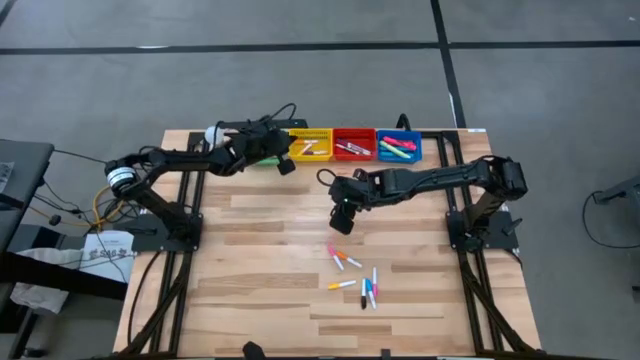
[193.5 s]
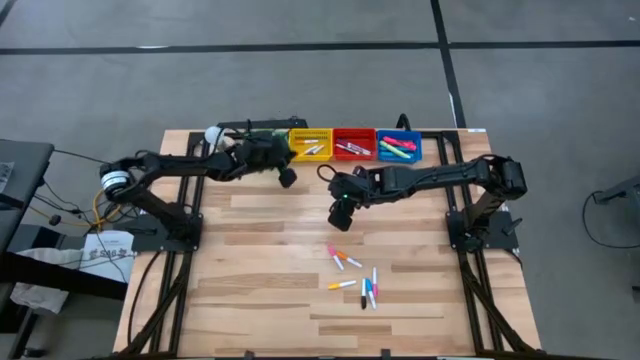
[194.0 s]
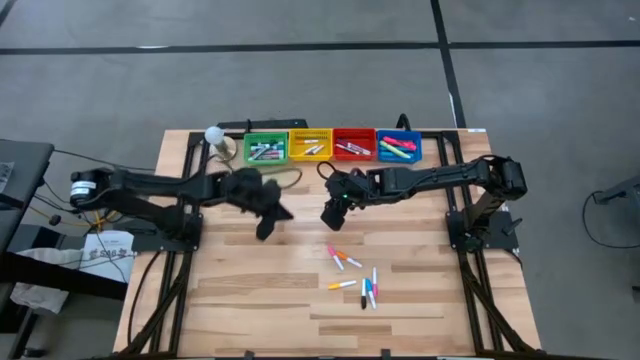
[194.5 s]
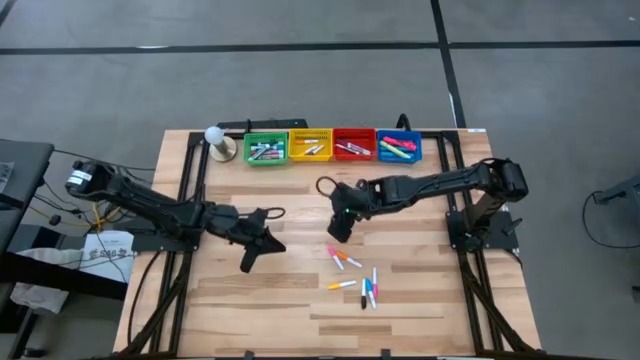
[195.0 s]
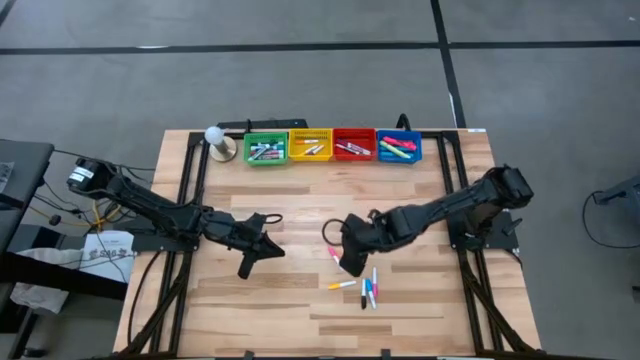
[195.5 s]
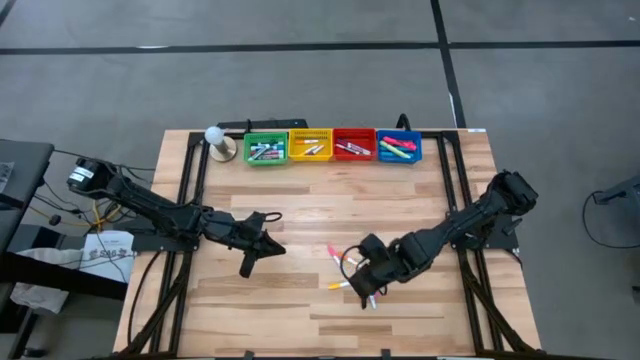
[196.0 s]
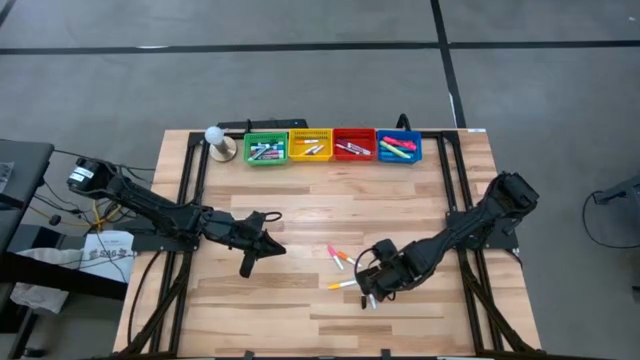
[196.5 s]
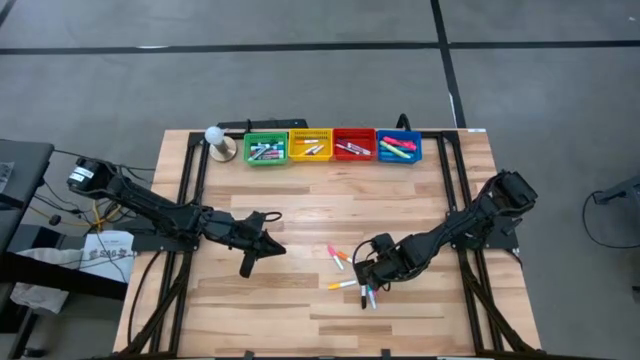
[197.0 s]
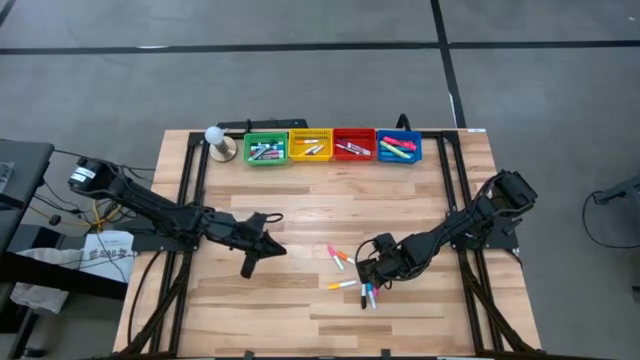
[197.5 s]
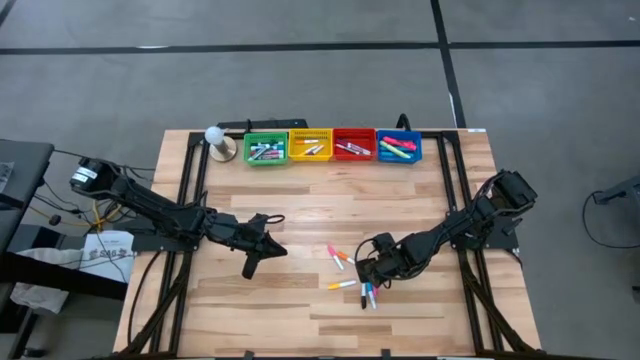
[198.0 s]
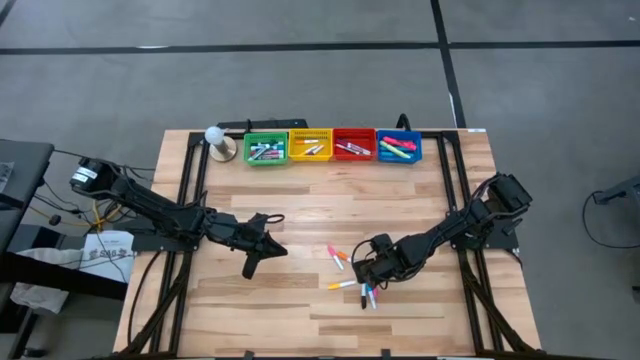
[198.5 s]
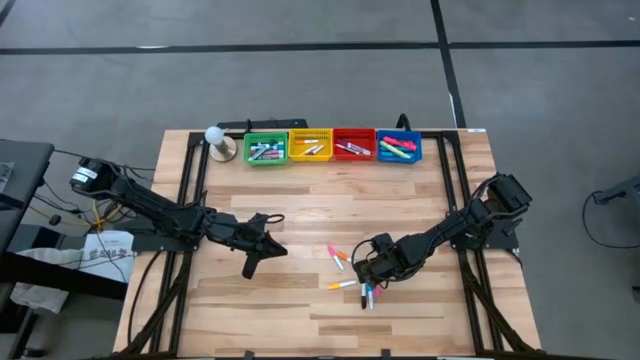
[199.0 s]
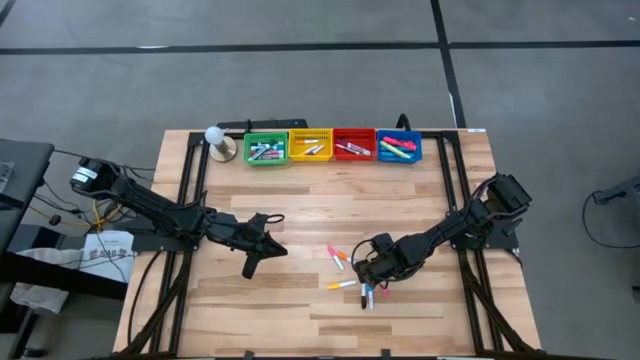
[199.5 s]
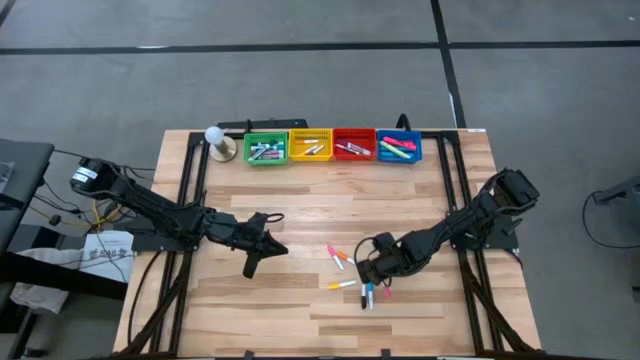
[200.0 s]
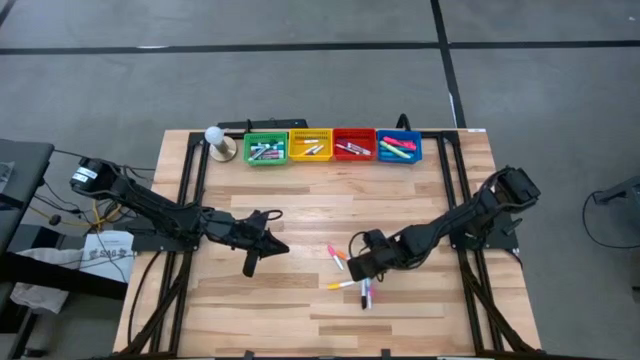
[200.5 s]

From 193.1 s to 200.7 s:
Task: Pick & Place Markers
Put the pink highlighter pen into the yellow basket

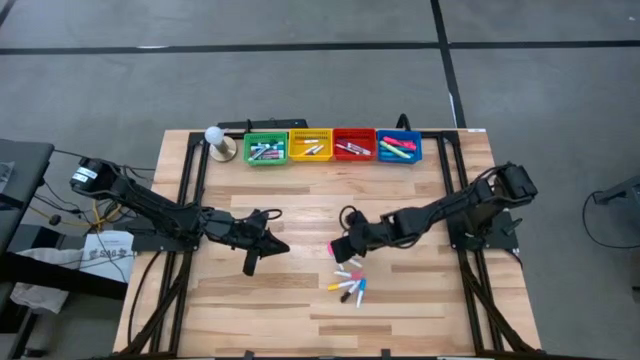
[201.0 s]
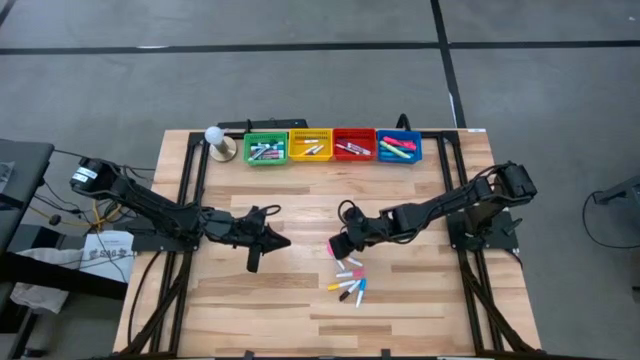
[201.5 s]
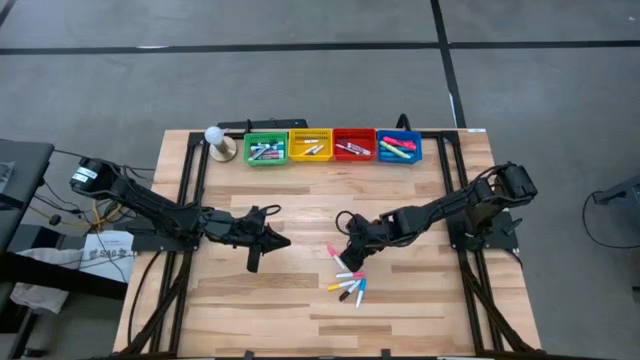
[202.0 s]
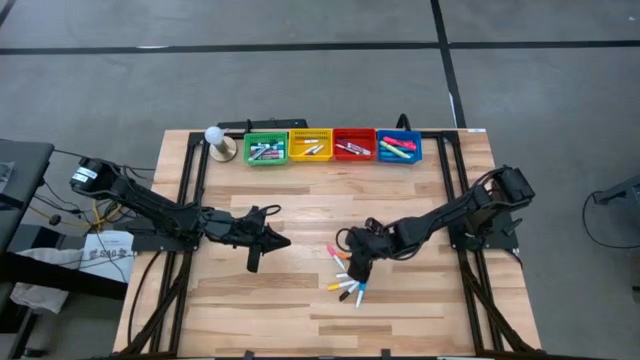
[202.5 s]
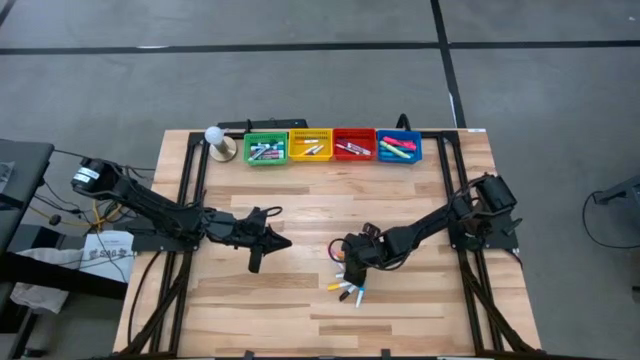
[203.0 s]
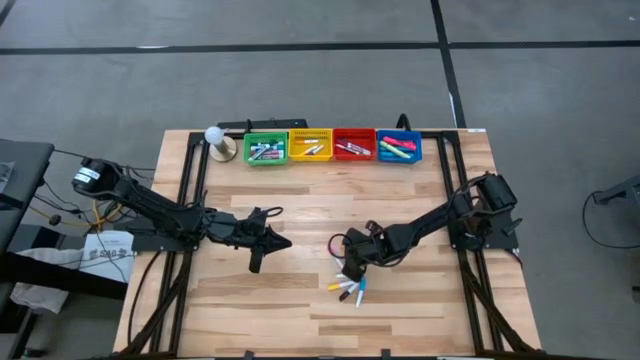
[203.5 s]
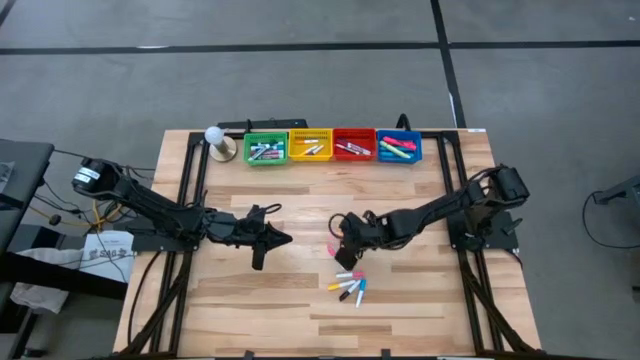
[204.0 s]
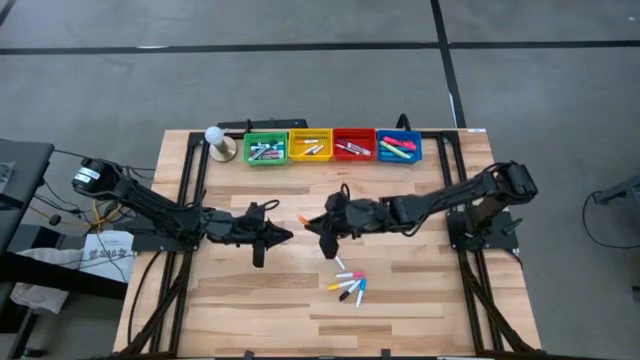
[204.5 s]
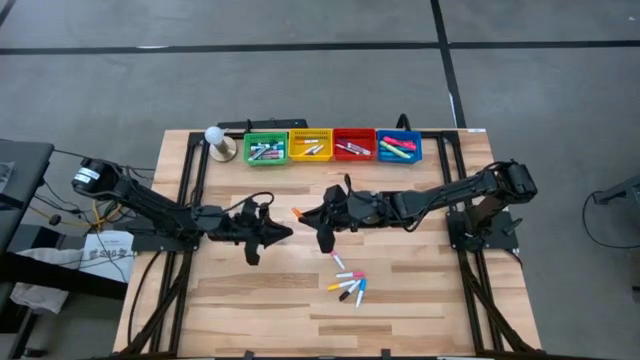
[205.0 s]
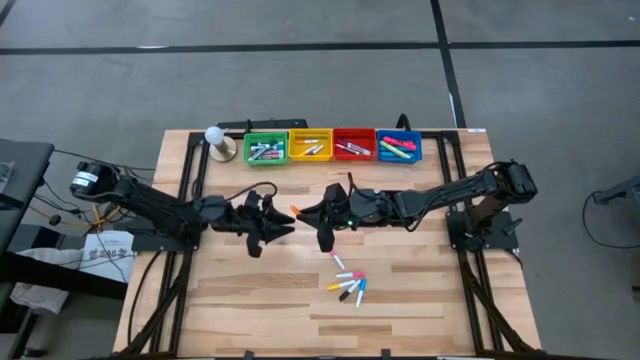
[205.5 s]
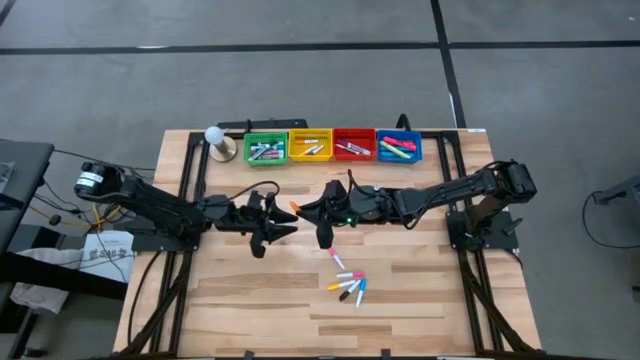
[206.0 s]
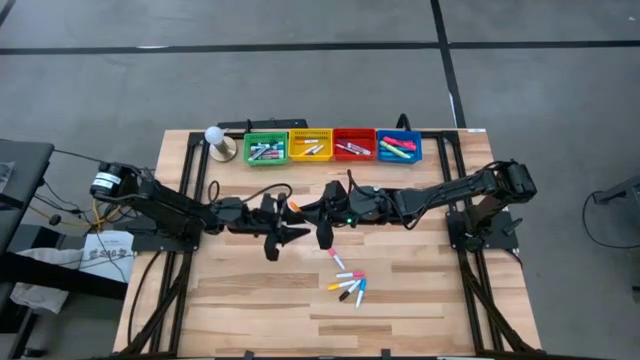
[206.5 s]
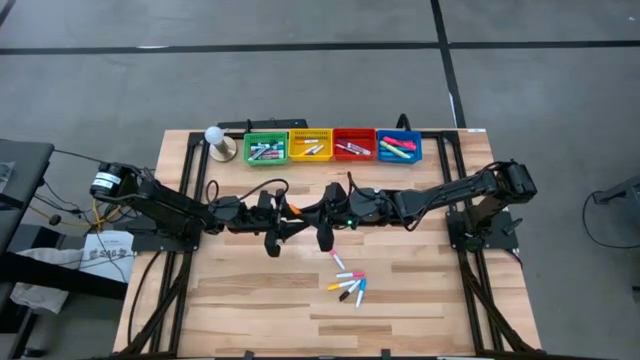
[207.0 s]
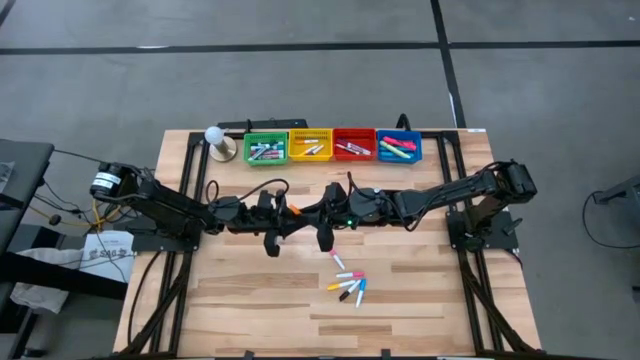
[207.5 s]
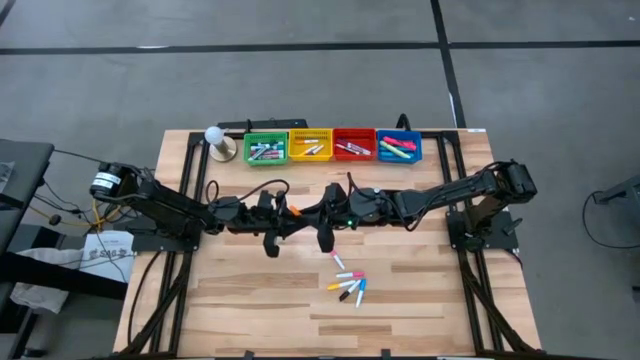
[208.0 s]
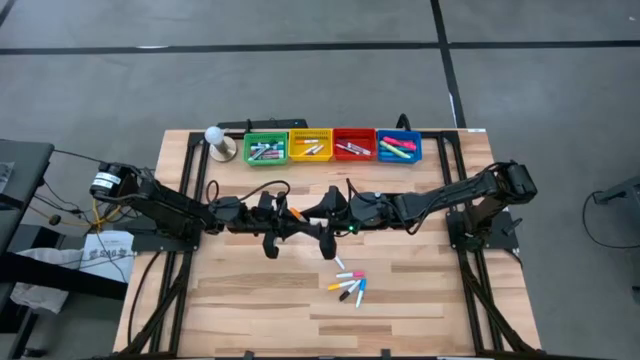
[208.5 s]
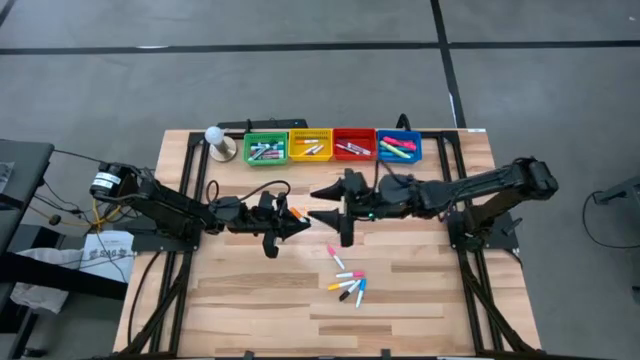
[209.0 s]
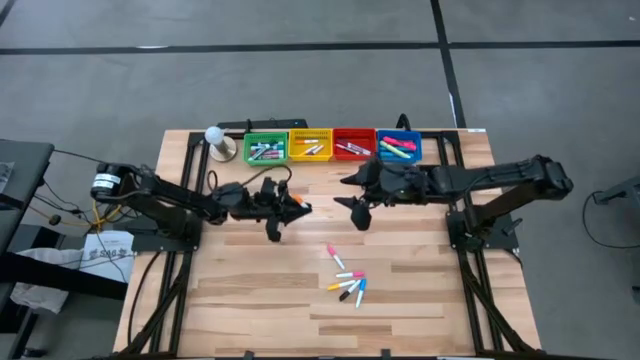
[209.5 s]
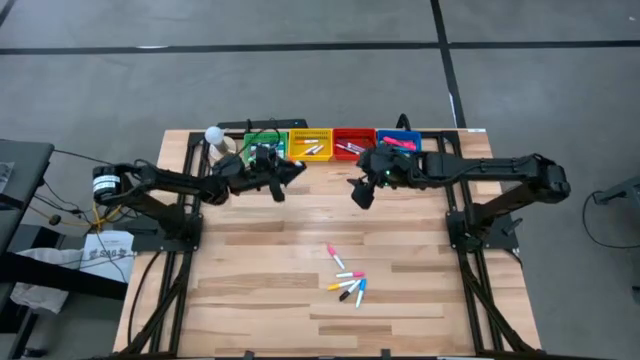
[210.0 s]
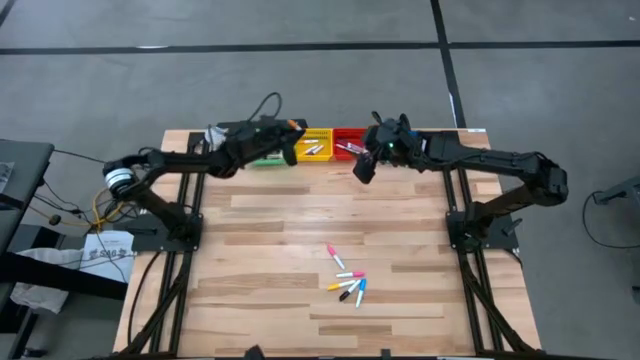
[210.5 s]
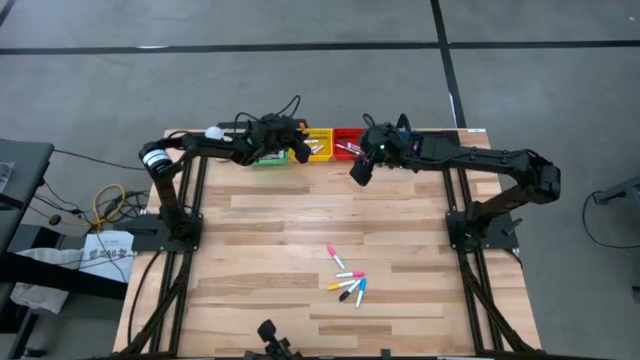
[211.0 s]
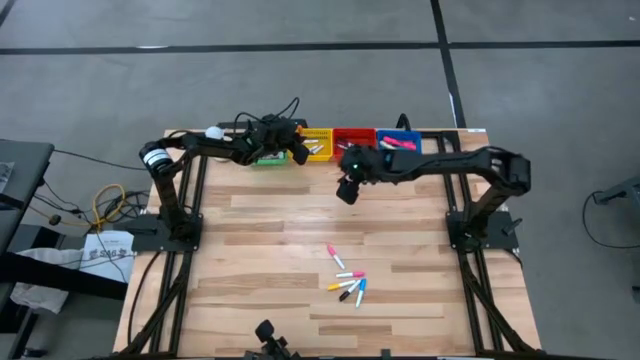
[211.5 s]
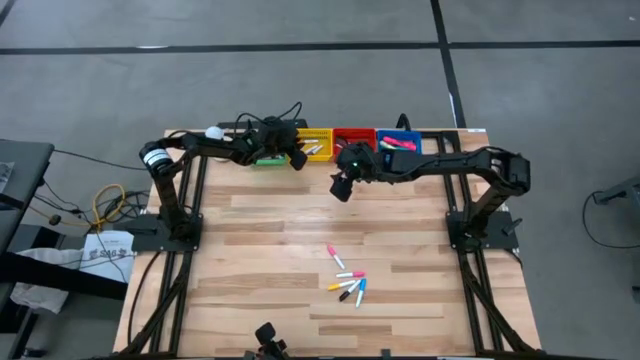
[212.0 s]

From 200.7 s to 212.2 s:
Put the orange highlighter pen into the yellow basket
